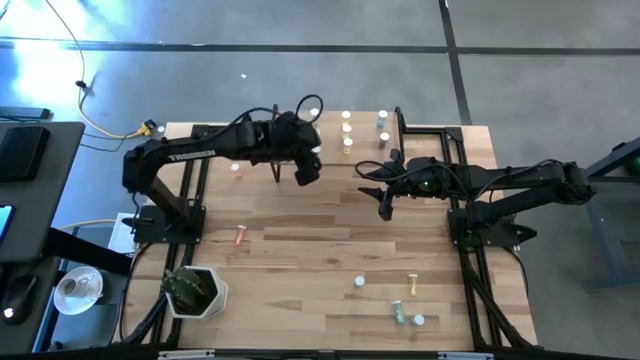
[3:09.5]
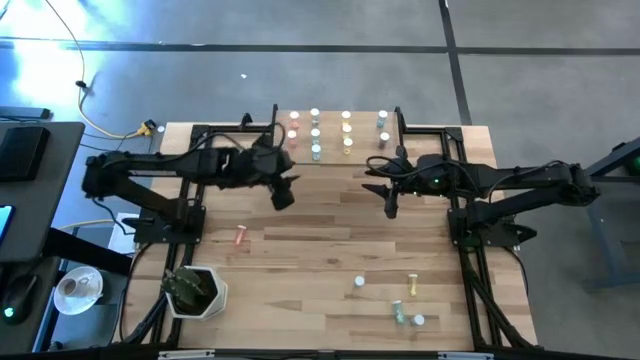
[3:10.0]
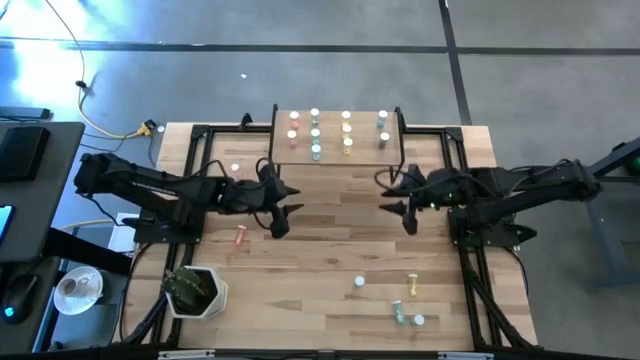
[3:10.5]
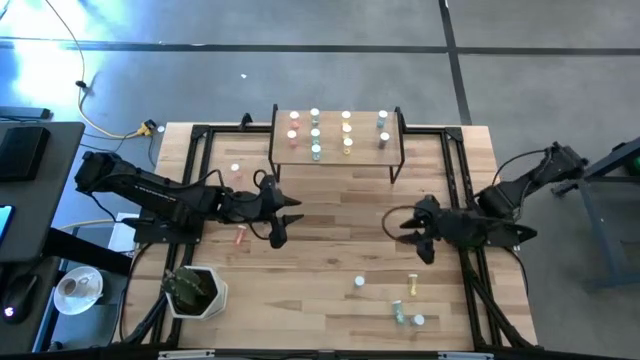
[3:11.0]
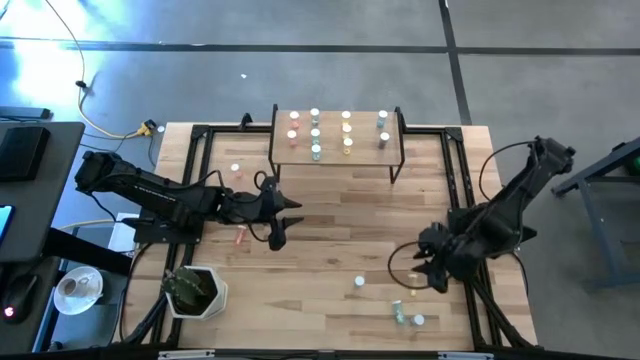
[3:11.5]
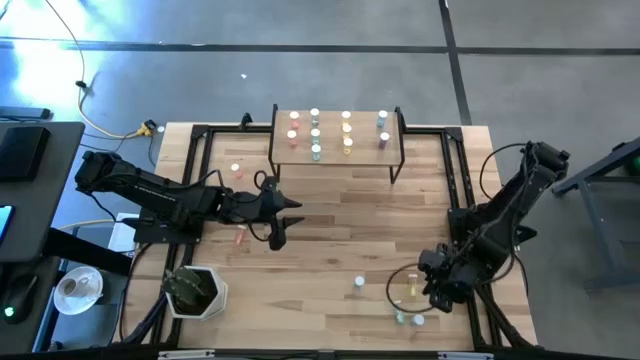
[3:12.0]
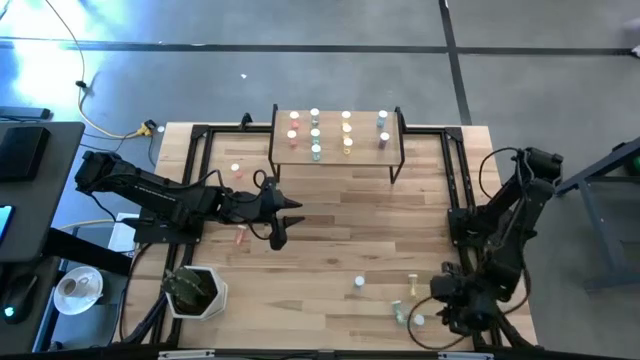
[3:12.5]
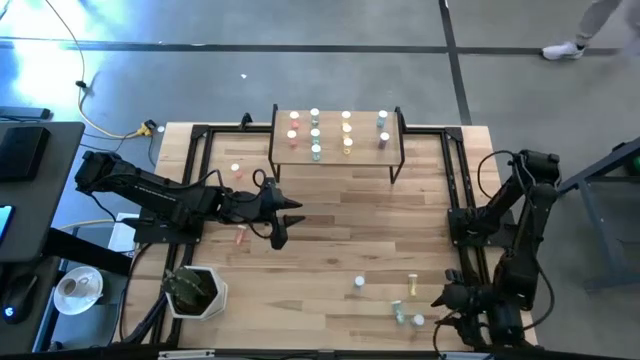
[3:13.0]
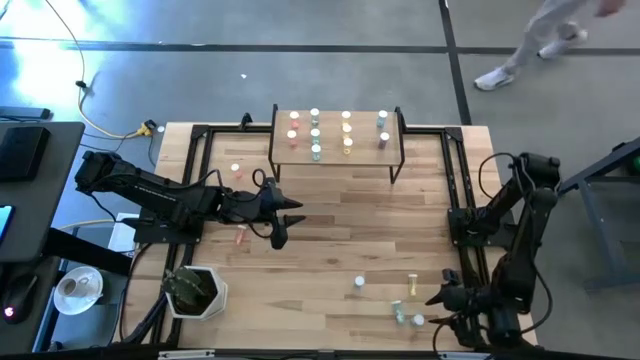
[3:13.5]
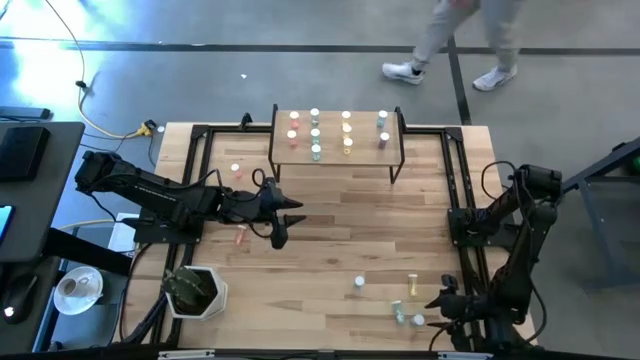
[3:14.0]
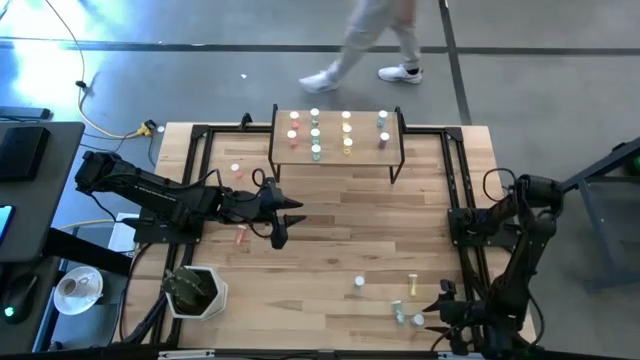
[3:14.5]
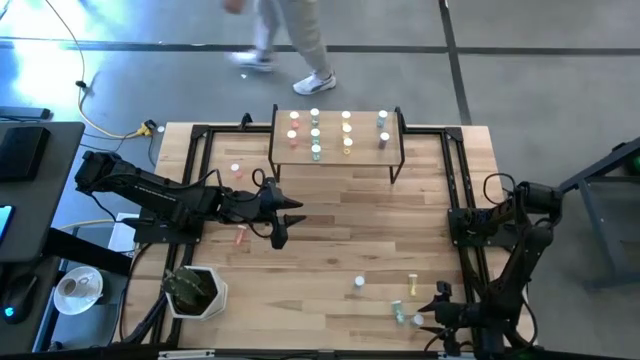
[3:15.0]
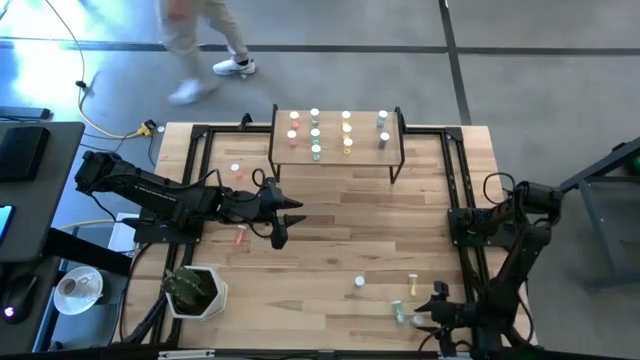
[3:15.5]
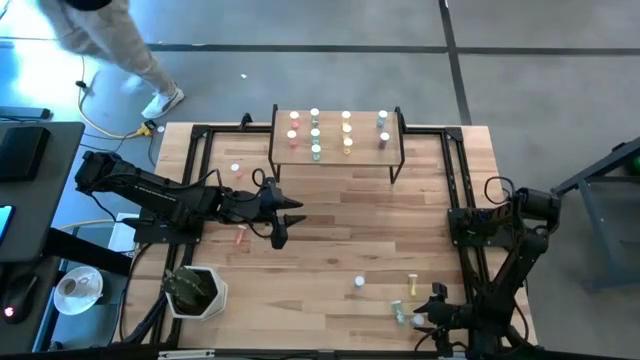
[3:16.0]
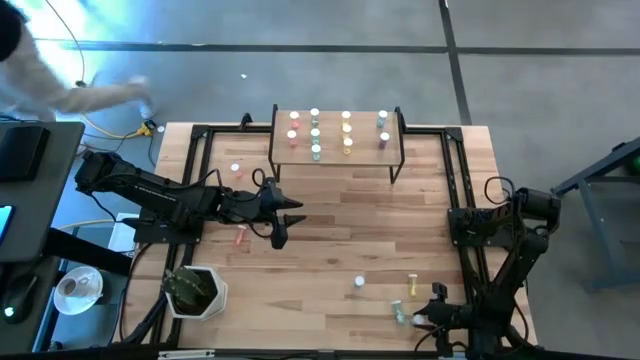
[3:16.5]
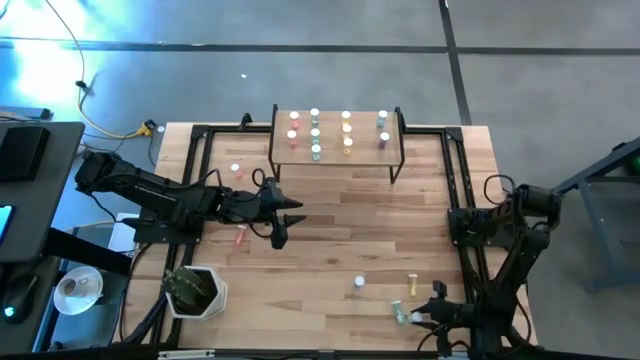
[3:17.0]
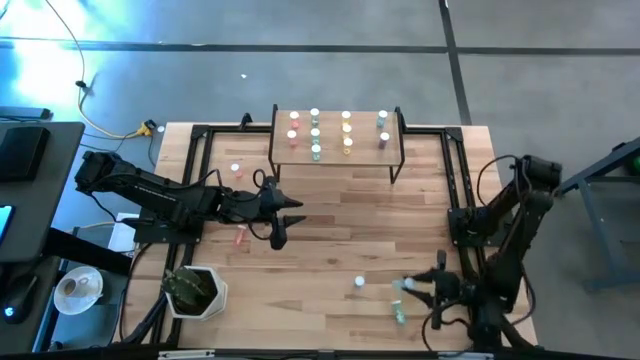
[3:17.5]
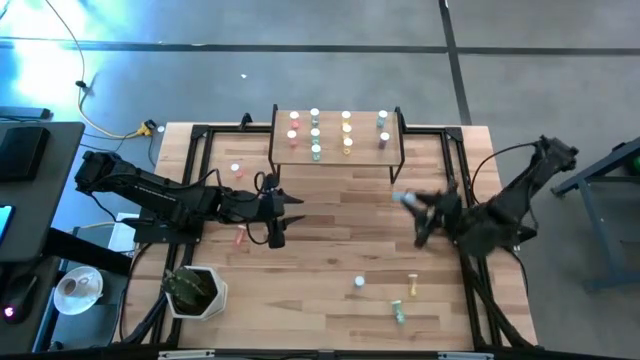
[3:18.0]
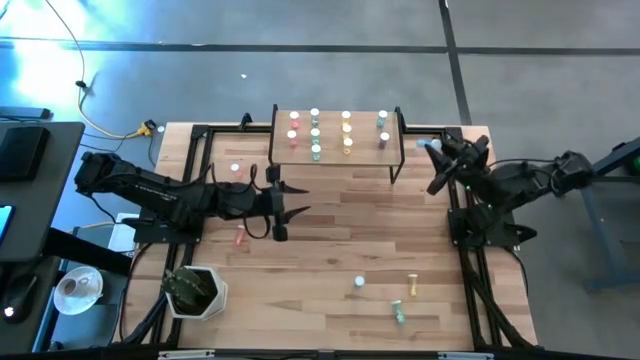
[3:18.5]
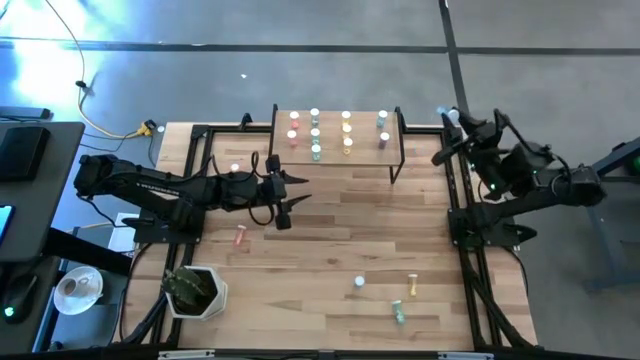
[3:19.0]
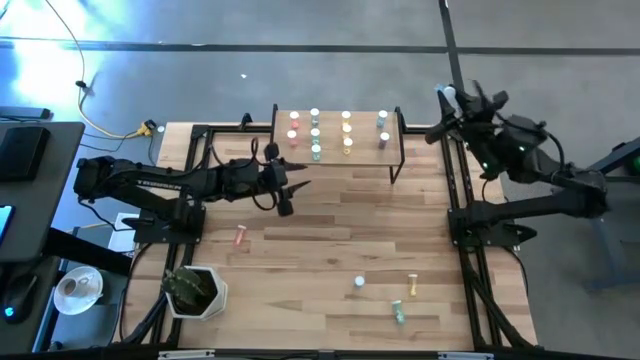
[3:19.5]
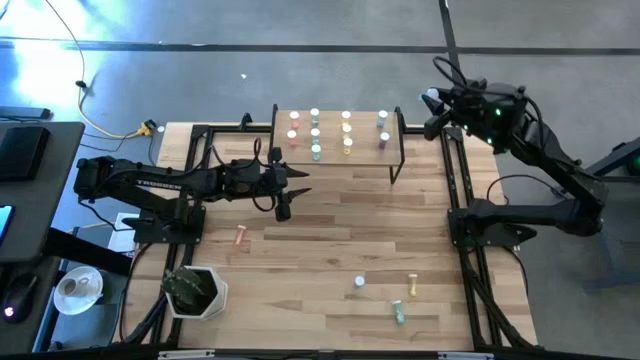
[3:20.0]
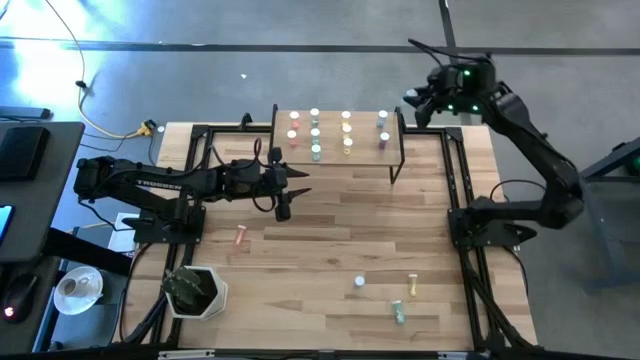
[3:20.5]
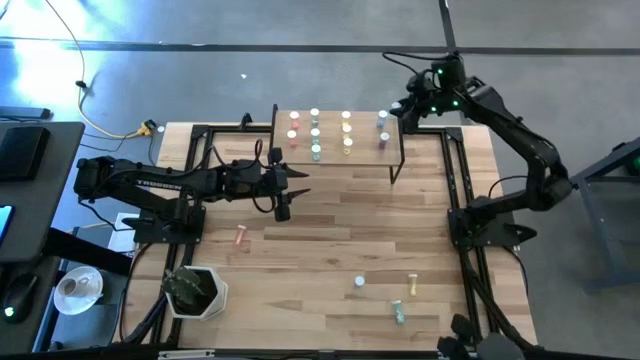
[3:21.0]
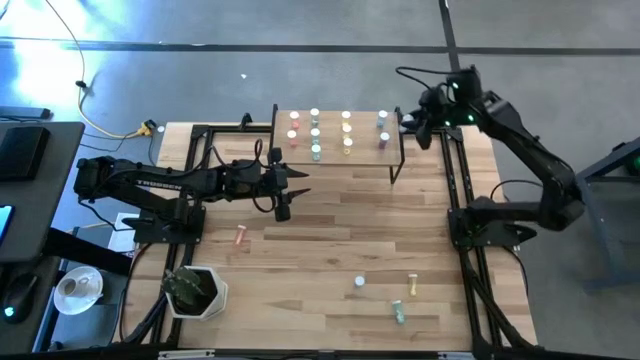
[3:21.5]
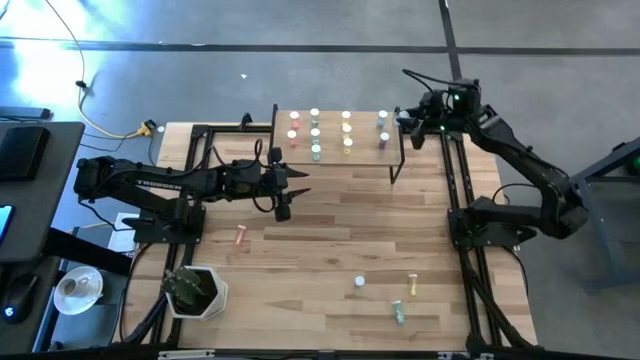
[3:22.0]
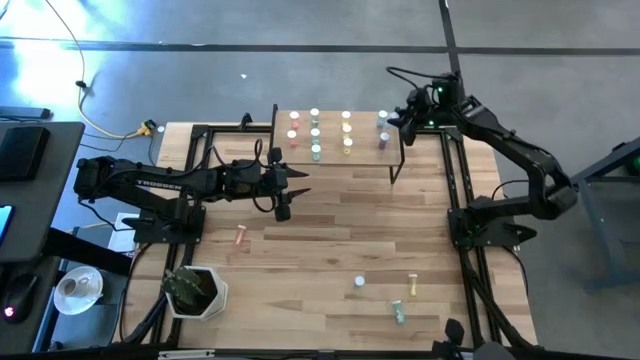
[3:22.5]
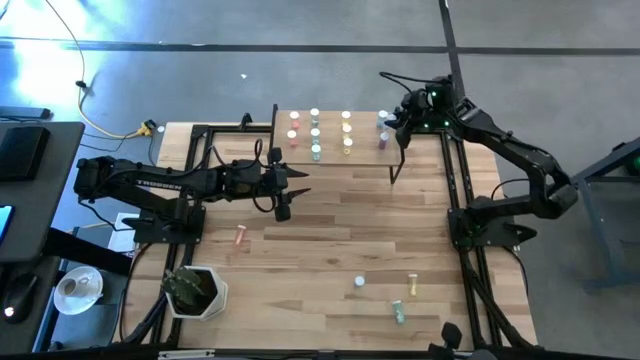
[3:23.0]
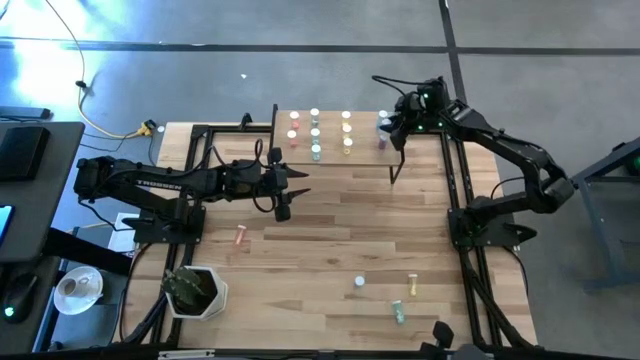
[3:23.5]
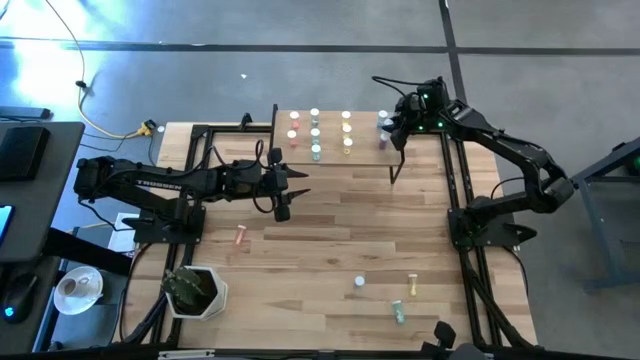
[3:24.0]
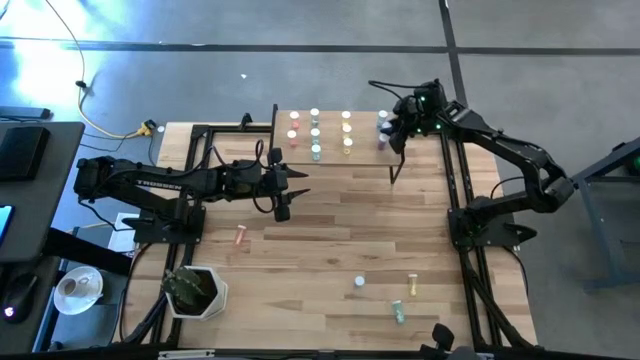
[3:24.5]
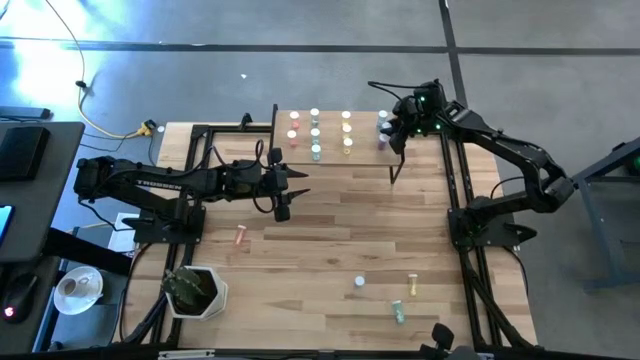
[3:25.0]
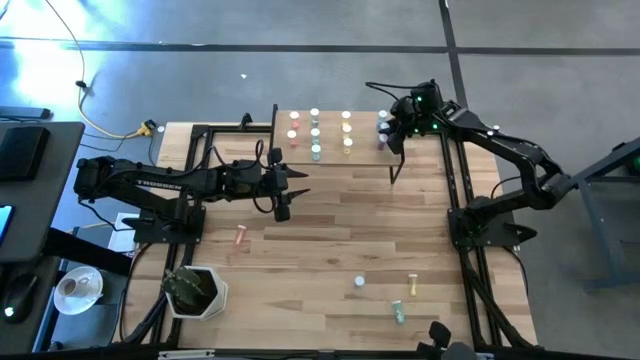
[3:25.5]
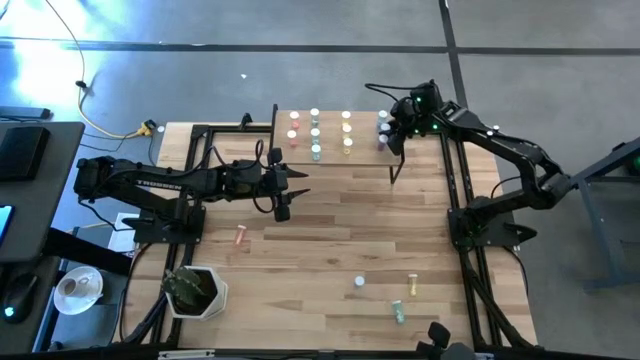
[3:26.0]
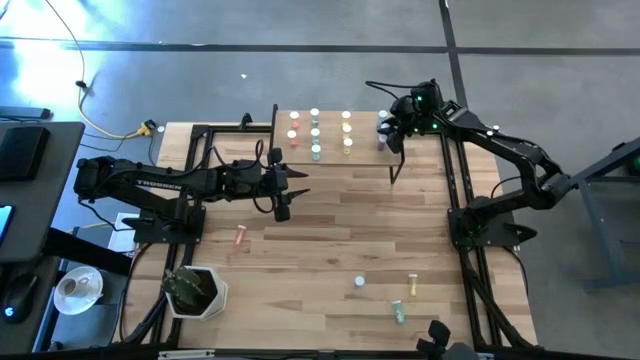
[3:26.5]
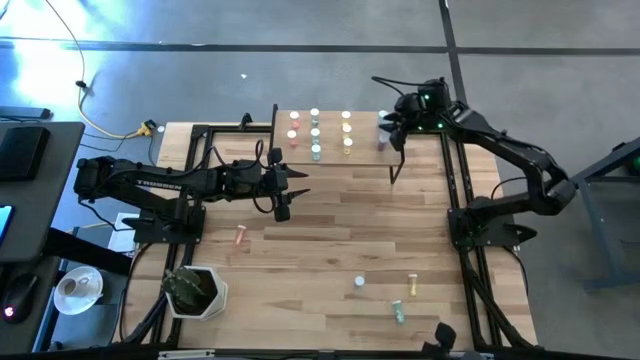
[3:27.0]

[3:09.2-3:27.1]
Task: Pick and place medicine bottles onto shelf by color
Put the blue medicine bottle on the shelf

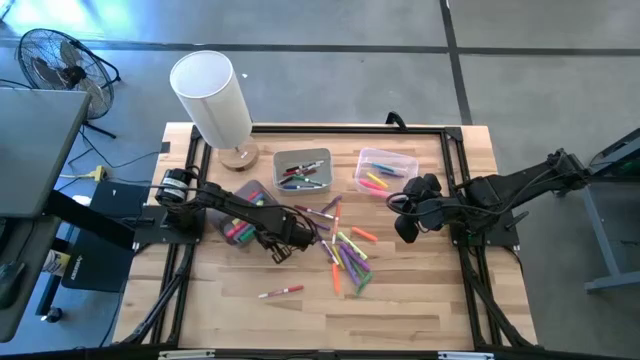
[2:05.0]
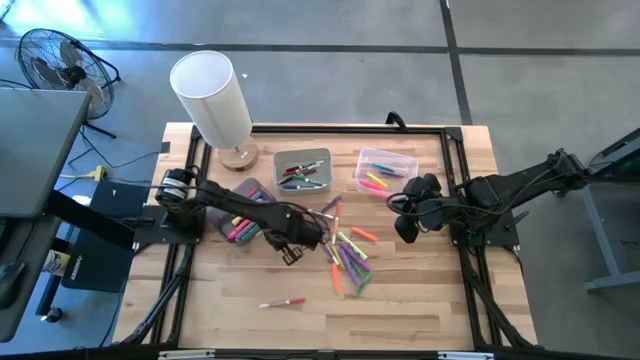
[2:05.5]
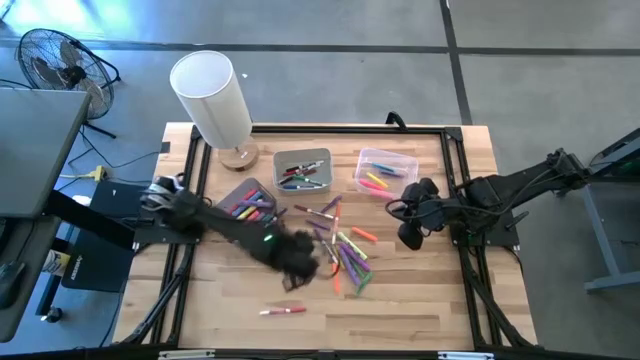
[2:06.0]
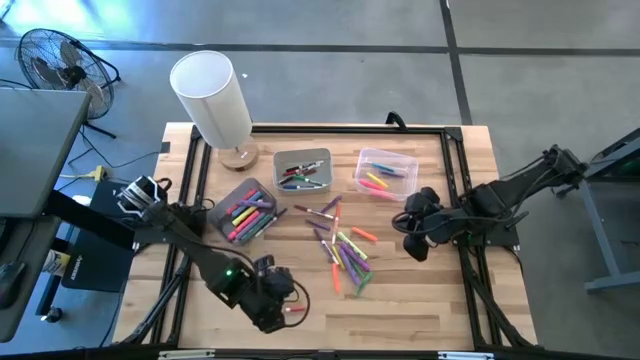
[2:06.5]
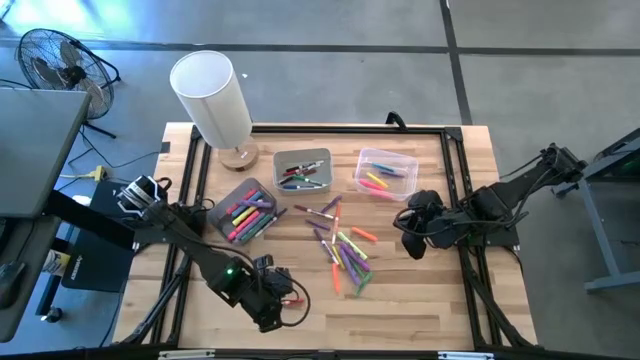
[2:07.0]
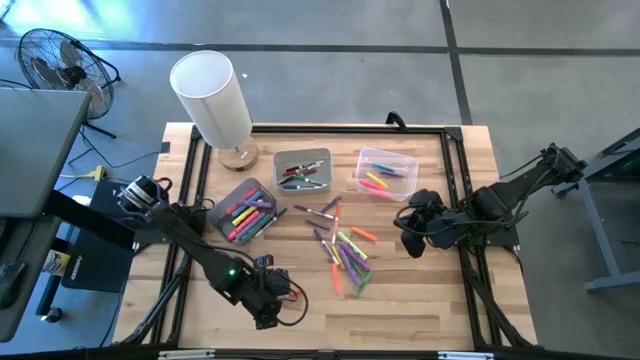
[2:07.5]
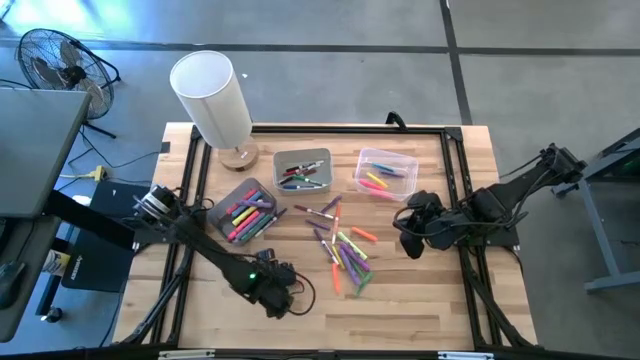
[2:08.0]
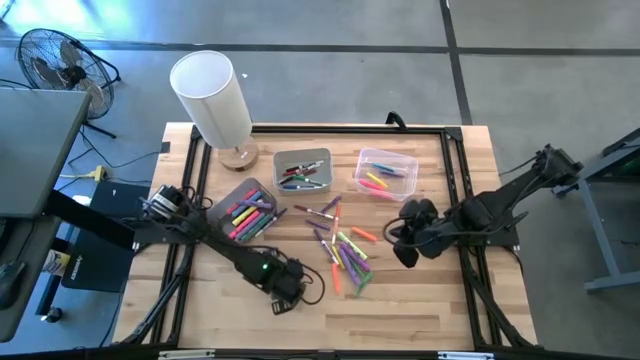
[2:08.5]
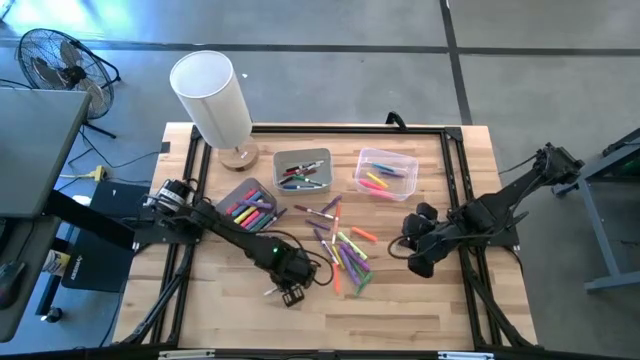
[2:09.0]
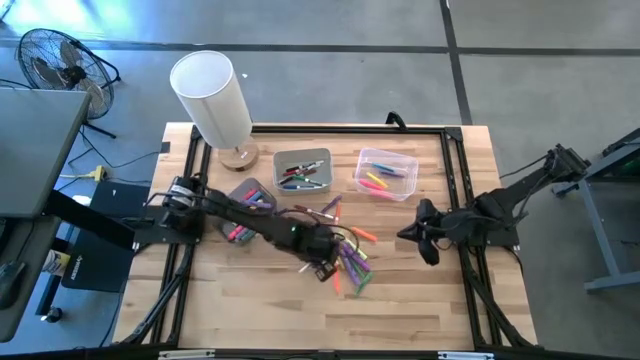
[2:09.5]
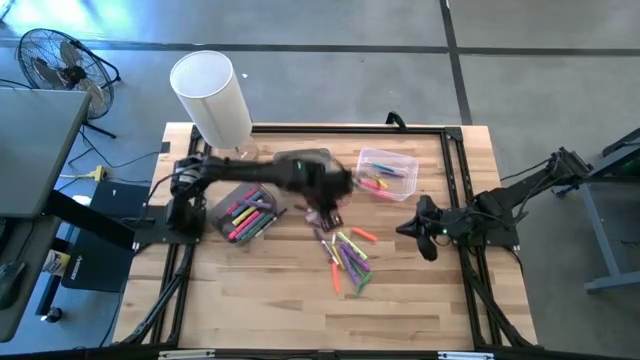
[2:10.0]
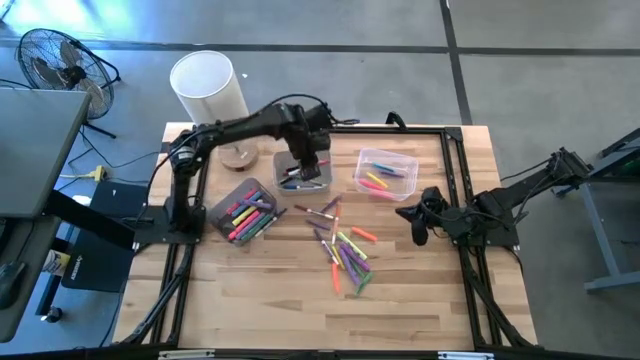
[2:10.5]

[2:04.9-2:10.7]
Task: Pick & Place Markers
Put the pink marker pen into the white bin
